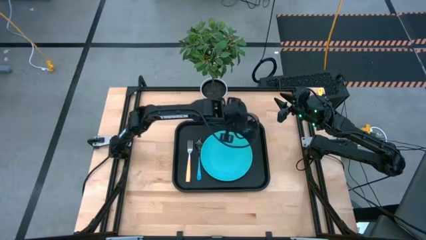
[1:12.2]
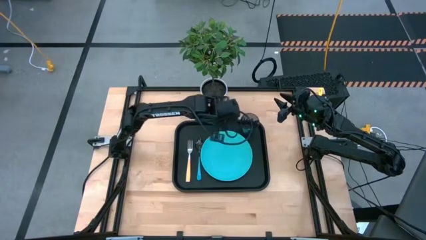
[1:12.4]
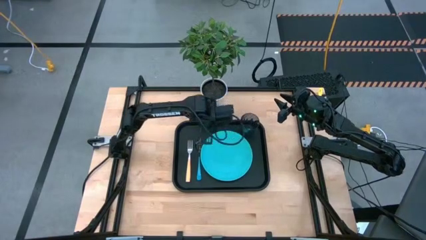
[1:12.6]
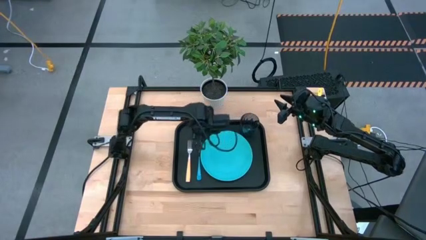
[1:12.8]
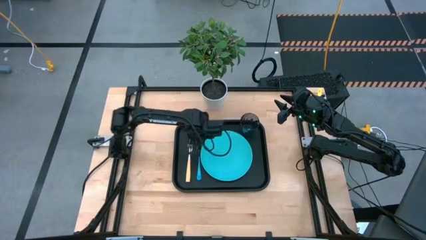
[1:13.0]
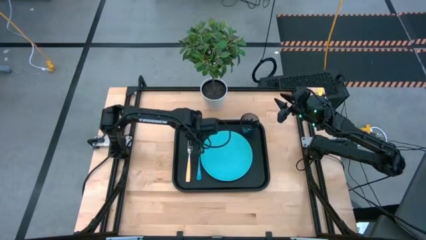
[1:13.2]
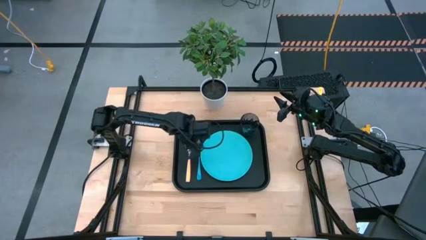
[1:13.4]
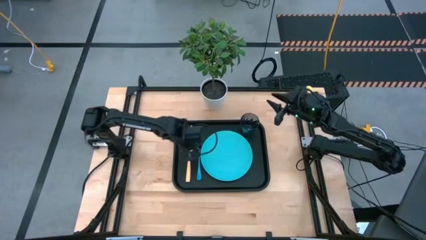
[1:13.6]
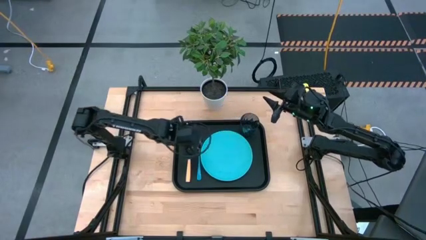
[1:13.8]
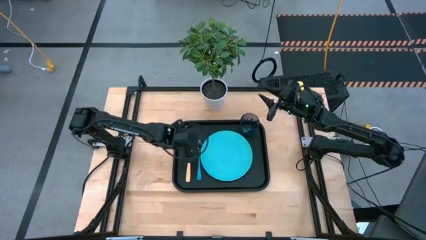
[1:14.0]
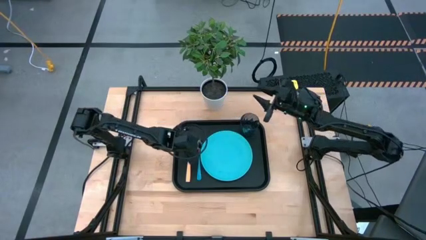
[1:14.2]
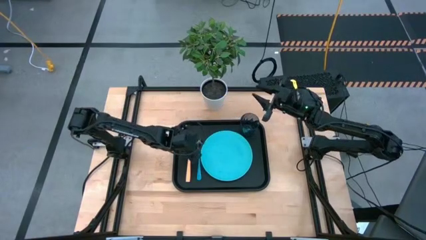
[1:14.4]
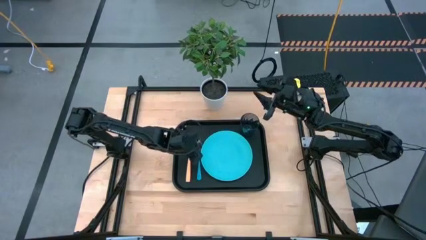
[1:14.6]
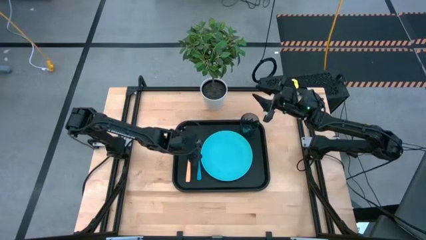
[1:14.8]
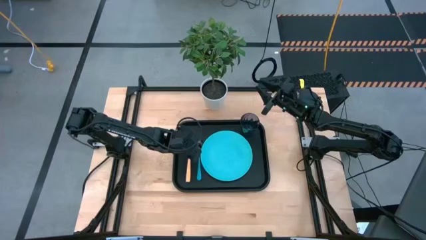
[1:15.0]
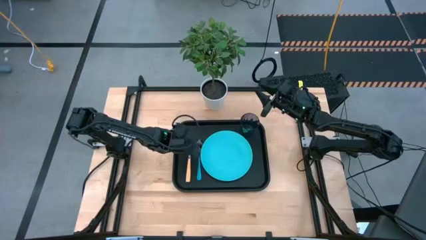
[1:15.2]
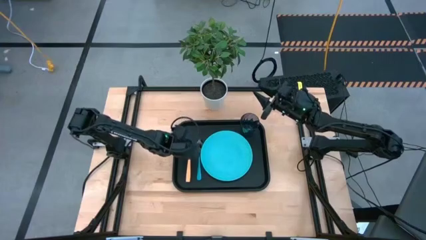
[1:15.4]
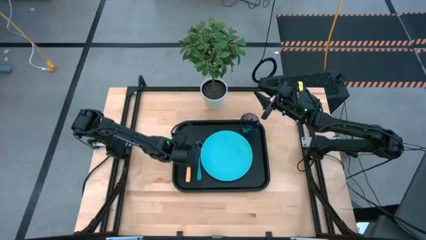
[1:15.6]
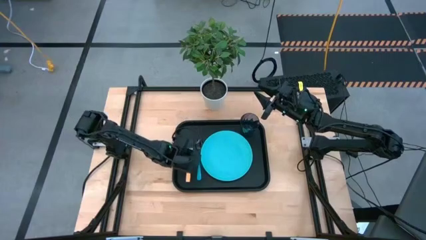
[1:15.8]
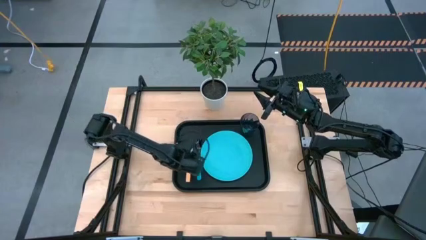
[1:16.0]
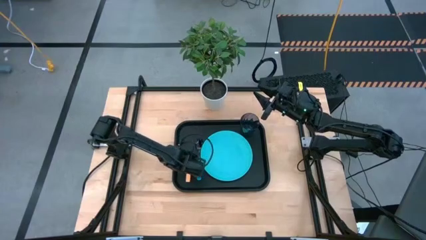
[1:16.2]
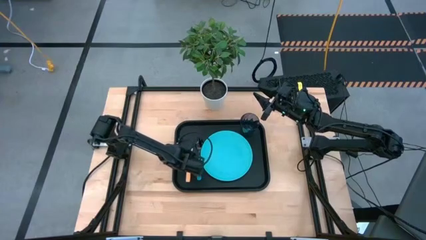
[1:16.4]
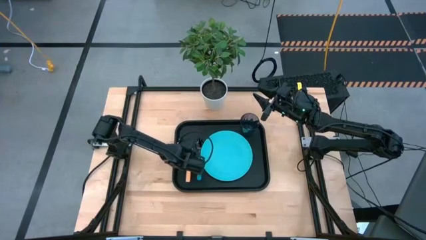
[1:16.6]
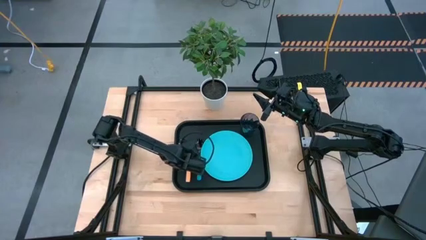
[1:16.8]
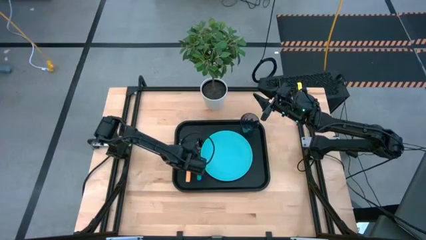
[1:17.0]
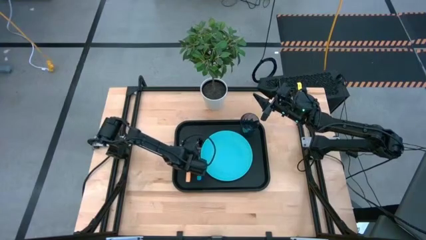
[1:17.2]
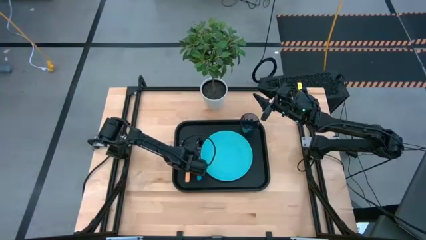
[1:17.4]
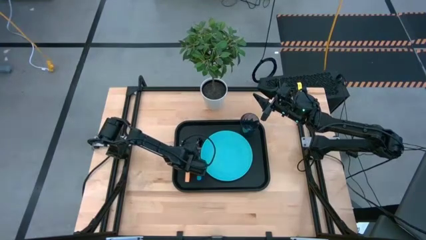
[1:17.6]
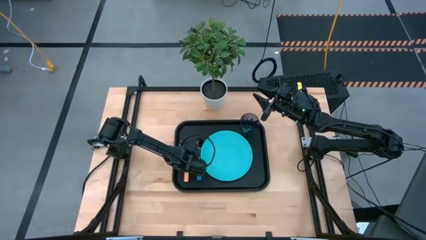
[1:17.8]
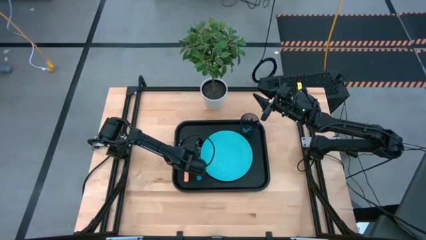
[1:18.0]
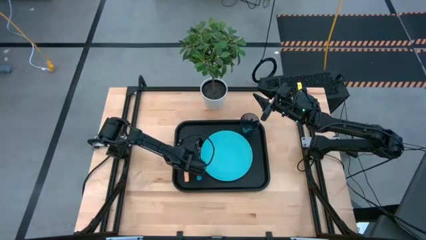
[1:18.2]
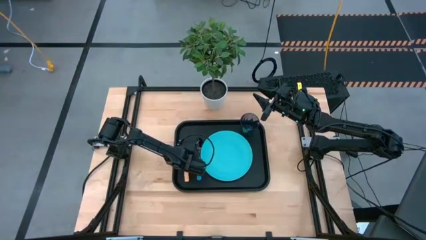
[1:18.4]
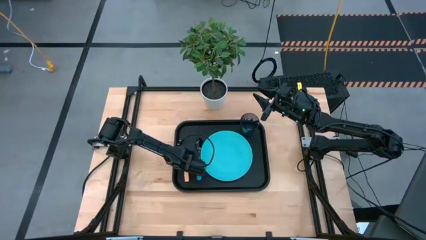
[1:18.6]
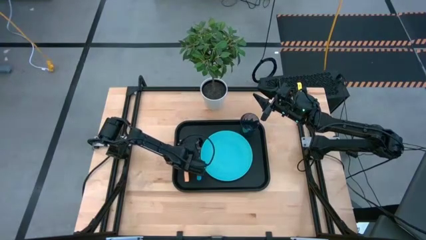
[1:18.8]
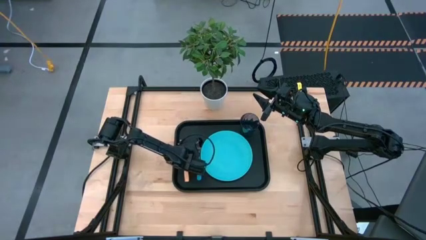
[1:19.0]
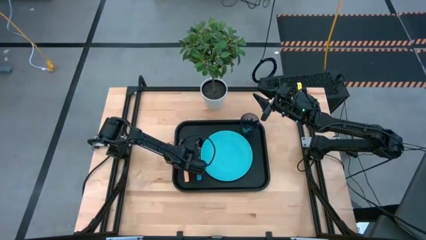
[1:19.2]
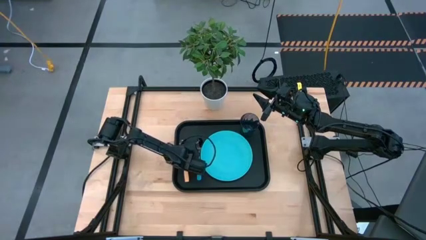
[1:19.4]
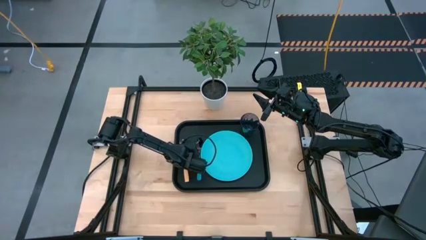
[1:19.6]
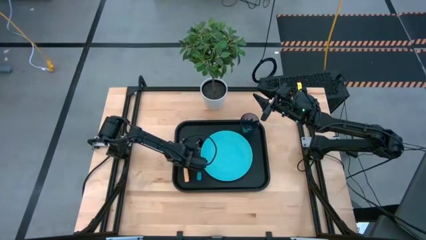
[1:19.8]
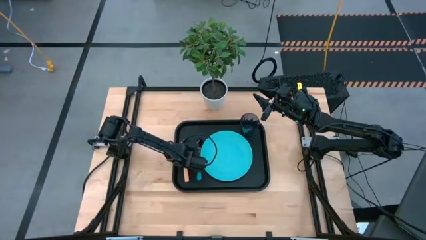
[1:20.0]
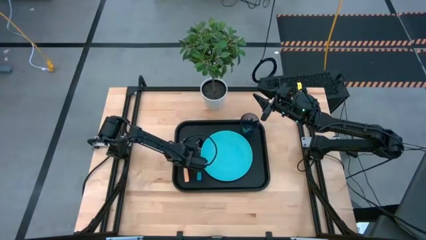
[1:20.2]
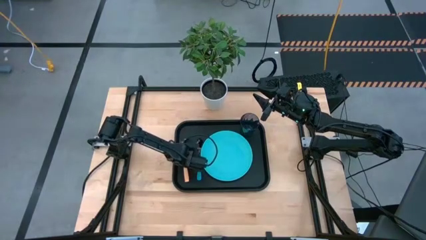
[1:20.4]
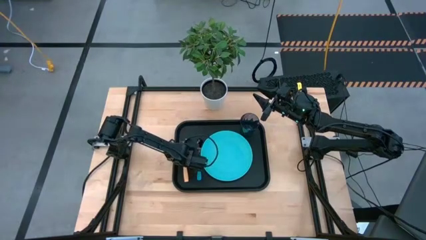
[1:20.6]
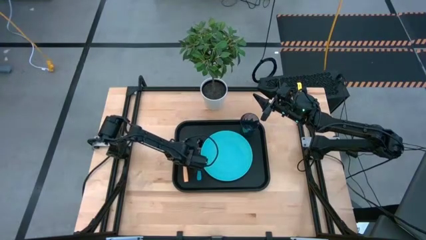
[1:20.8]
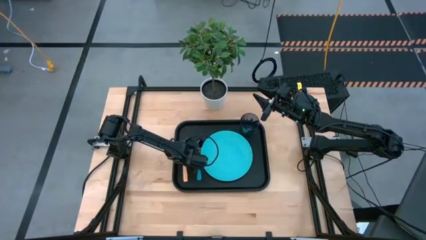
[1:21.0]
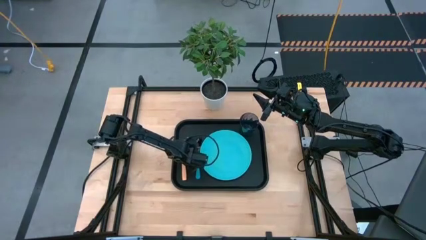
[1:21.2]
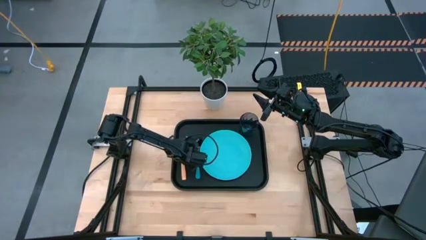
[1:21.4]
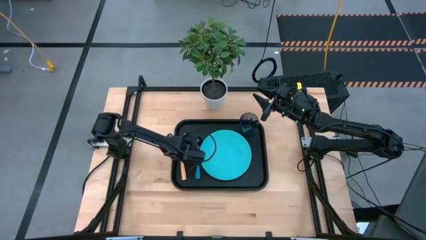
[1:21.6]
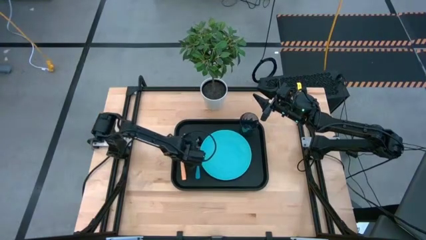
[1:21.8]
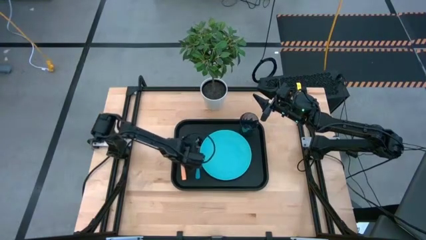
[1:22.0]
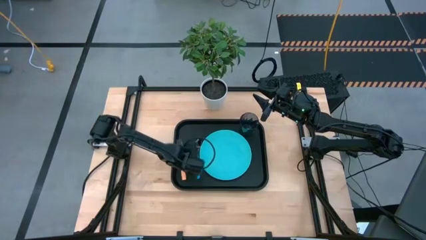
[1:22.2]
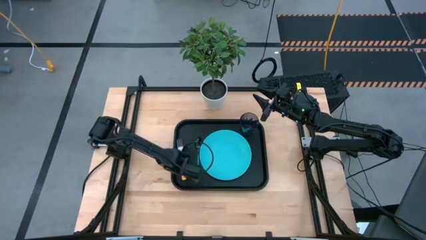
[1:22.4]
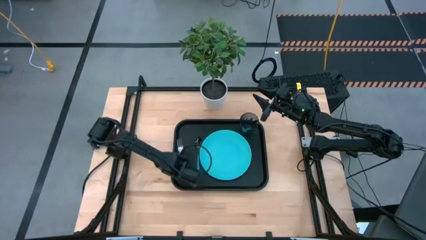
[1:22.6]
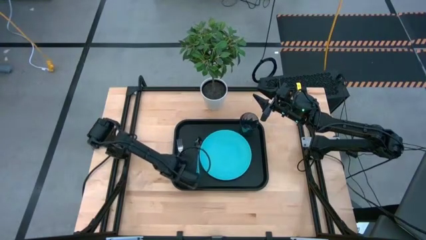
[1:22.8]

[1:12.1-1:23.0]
Task: Pick and place plate/cup/fork/spoon on tray
Adjust the yellow fork on the black tray

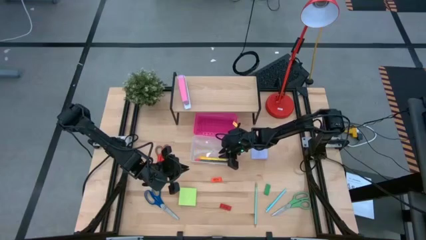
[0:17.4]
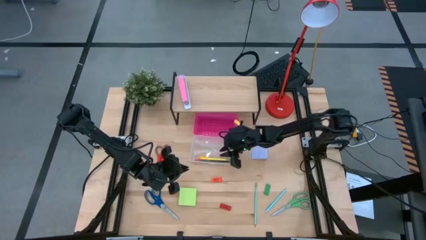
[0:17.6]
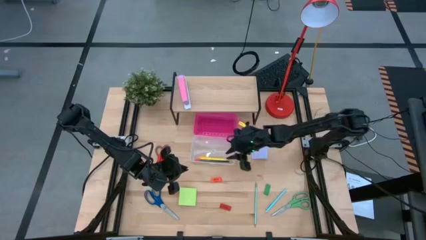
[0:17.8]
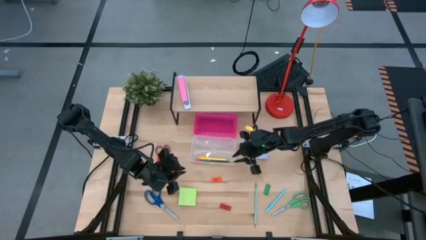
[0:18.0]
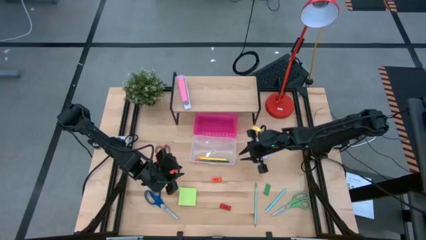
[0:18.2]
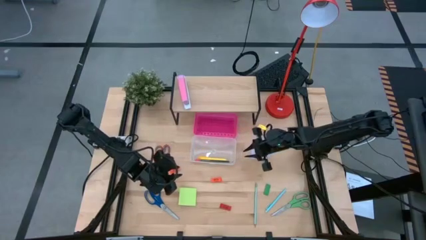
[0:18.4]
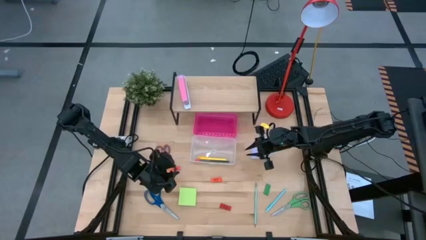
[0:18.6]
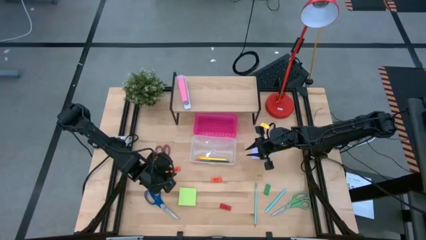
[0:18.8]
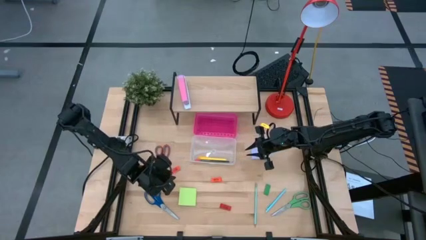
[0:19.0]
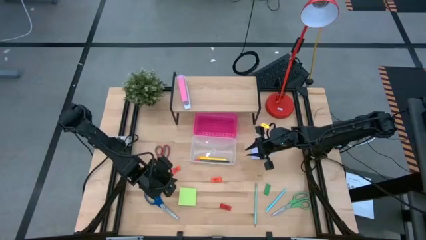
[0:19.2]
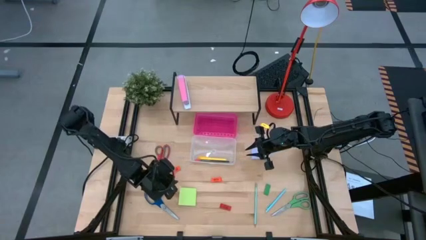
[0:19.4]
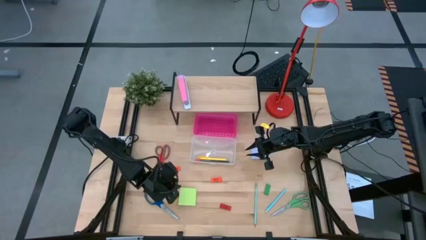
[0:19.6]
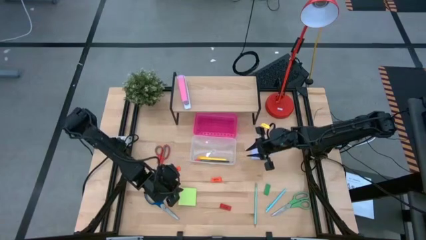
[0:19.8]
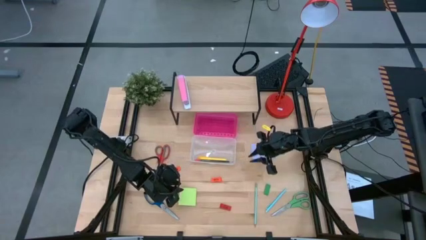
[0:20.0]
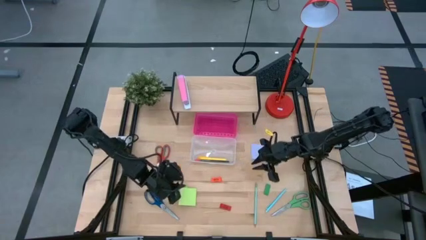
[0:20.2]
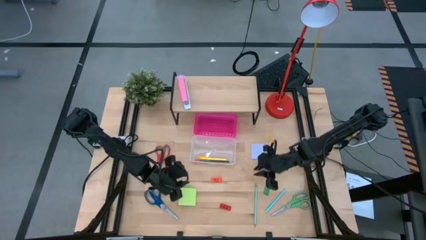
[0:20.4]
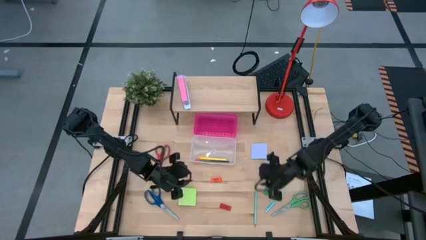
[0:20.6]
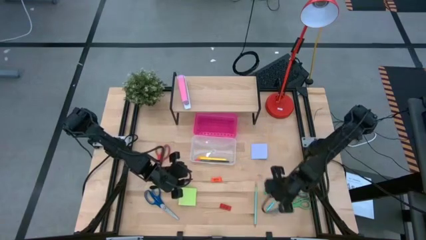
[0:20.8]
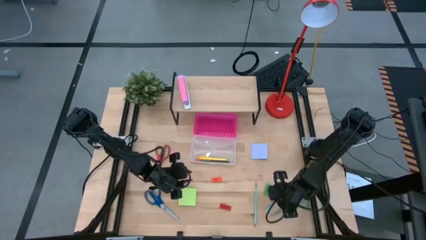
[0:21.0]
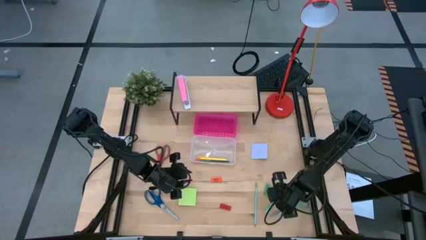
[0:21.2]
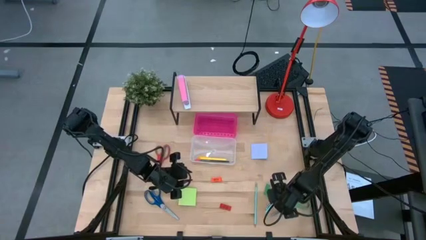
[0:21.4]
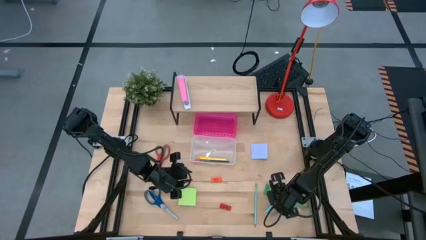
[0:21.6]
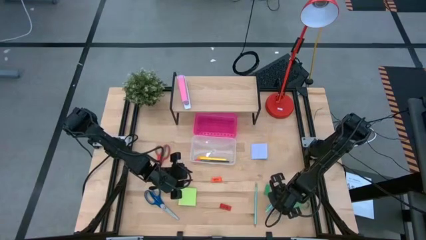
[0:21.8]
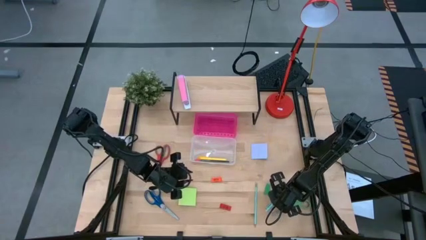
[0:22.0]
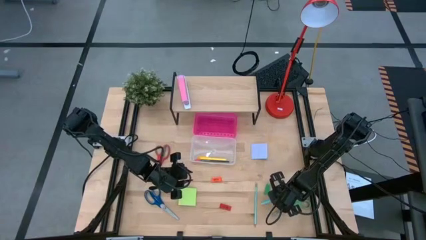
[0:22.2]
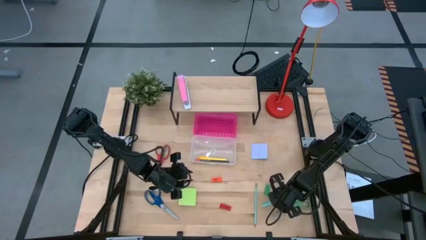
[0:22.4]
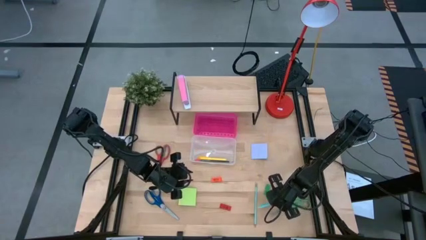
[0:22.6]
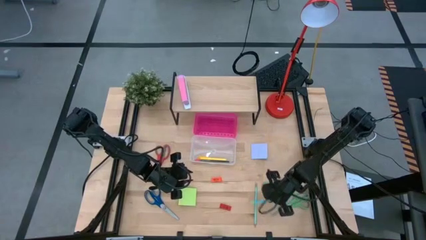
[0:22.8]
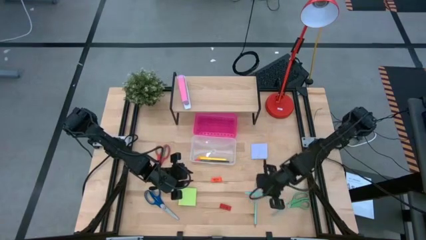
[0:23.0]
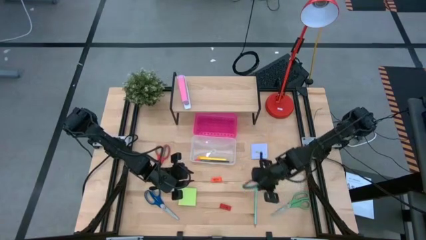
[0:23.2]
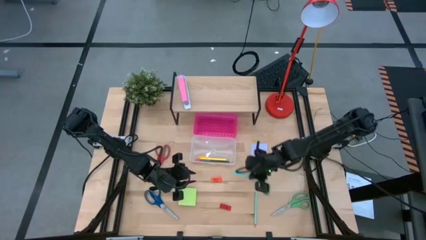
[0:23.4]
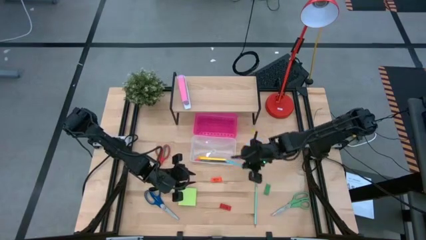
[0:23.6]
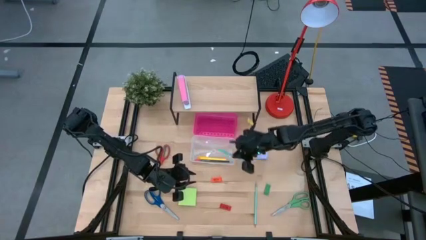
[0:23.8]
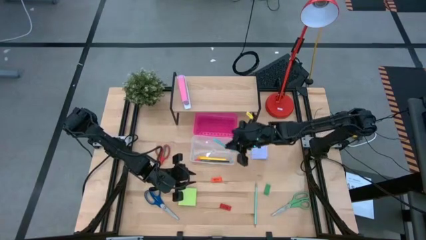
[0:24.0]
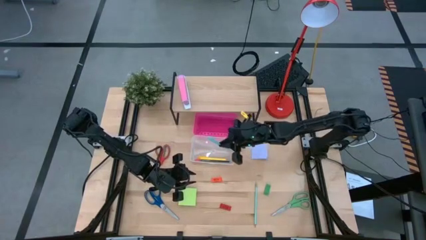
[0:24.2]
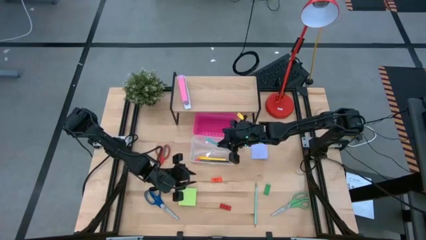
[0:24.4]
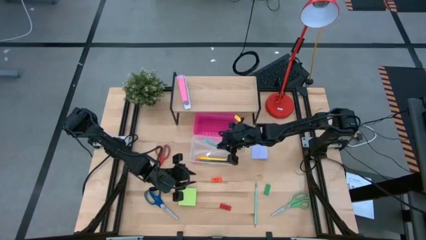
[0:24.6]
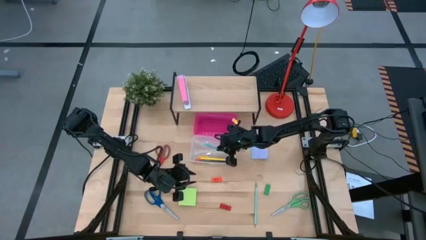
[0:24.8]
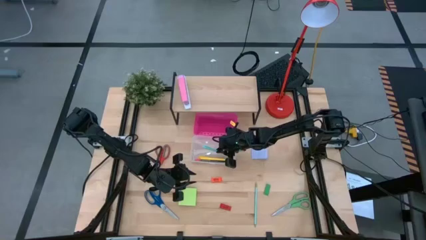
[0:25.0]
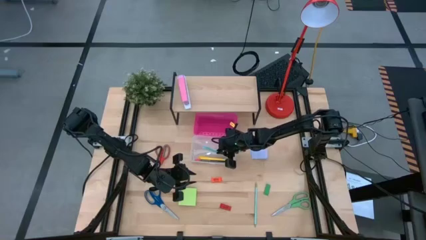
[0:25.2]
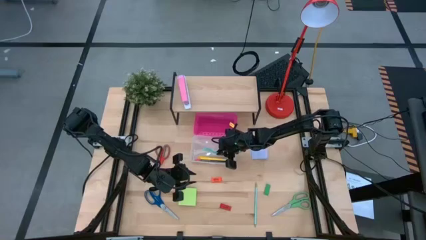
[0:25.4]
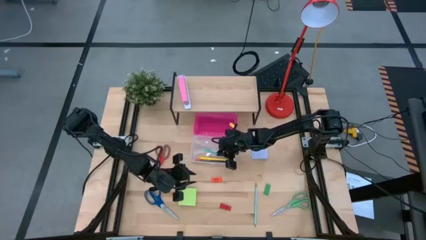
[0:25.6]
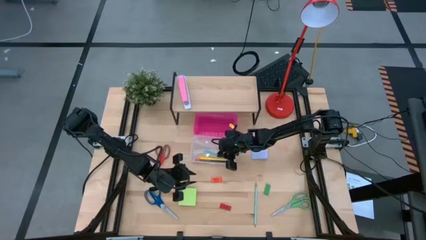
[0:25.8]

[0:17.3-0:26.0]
Task: Pack school essentials
Put the blue pen into the supply box
